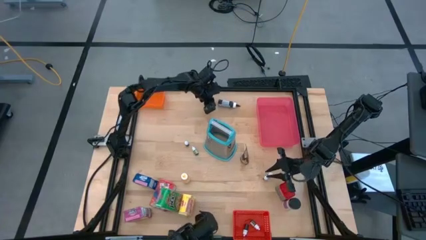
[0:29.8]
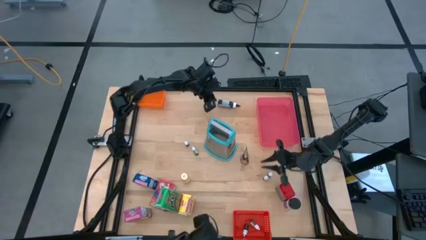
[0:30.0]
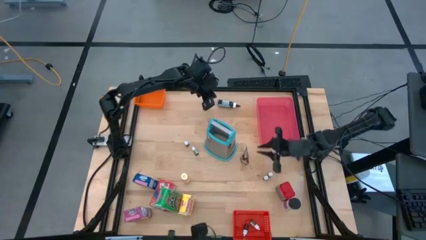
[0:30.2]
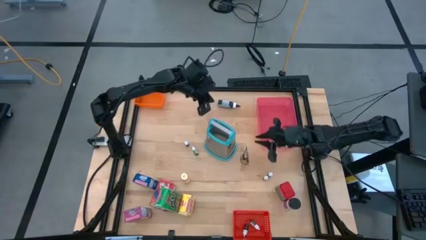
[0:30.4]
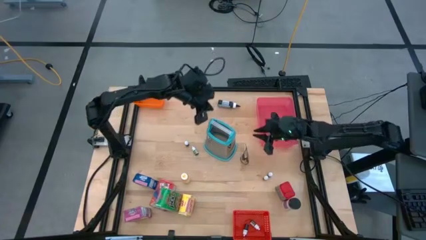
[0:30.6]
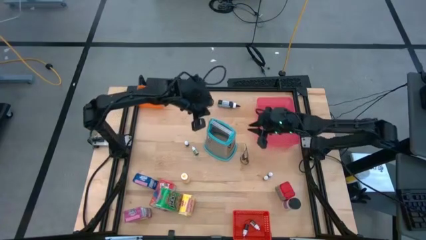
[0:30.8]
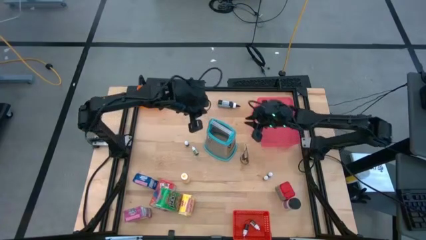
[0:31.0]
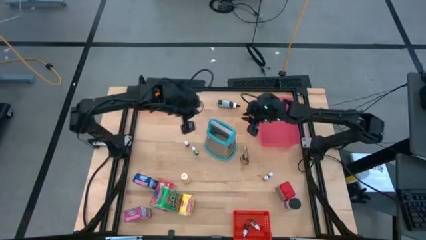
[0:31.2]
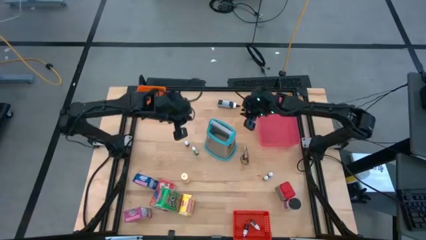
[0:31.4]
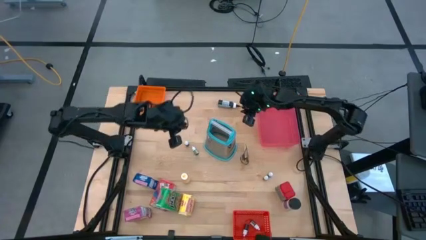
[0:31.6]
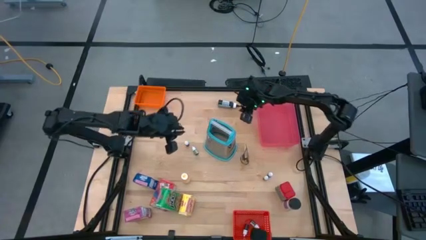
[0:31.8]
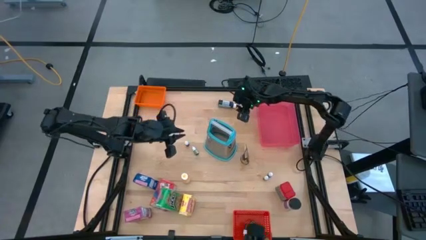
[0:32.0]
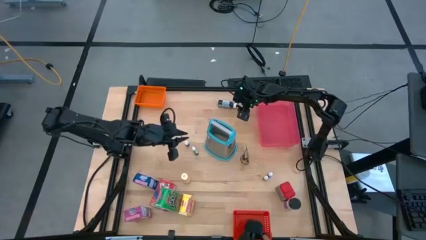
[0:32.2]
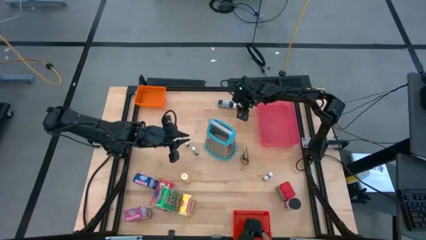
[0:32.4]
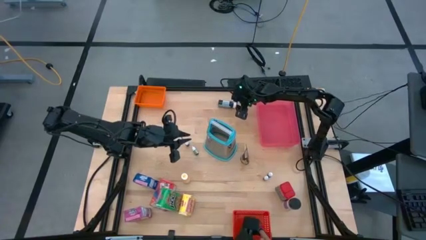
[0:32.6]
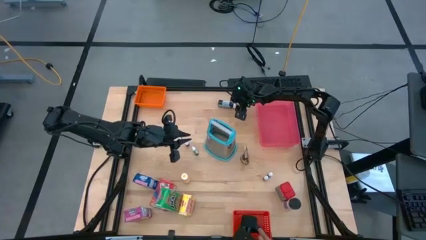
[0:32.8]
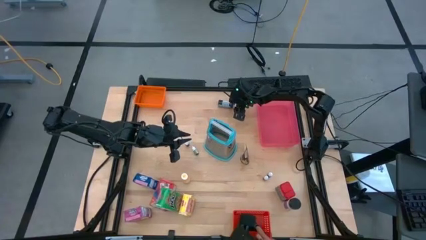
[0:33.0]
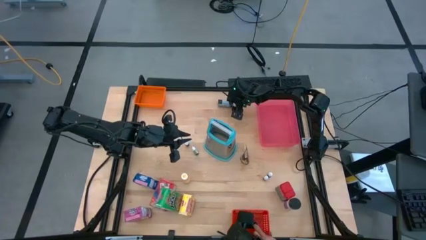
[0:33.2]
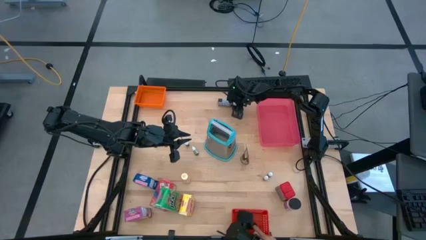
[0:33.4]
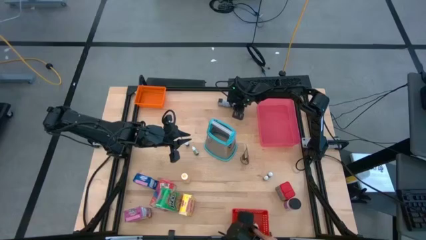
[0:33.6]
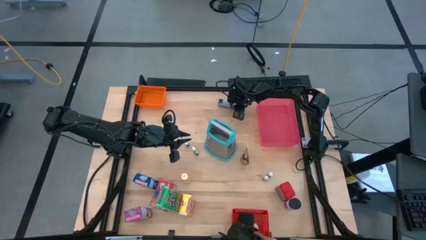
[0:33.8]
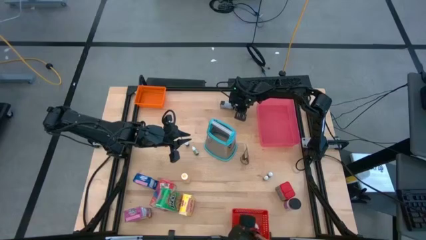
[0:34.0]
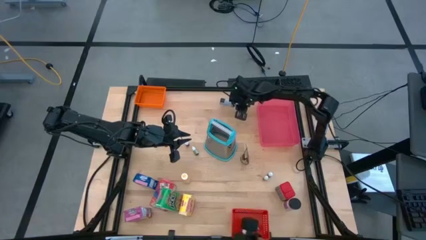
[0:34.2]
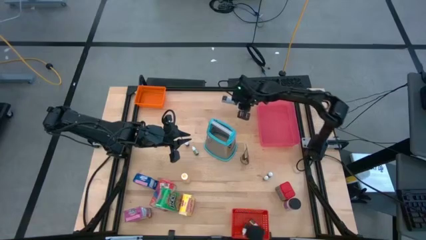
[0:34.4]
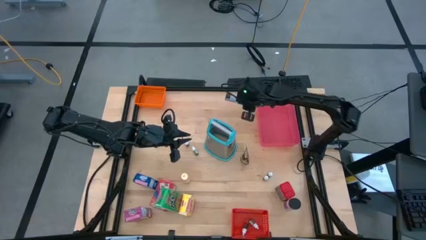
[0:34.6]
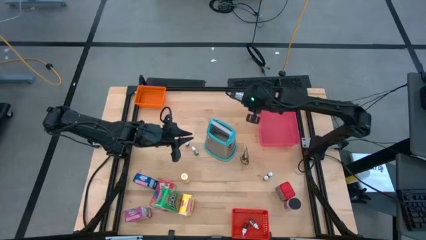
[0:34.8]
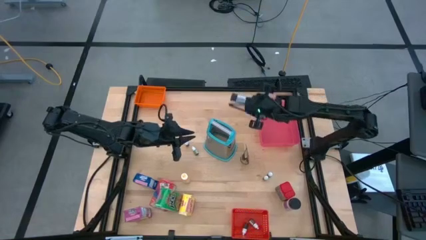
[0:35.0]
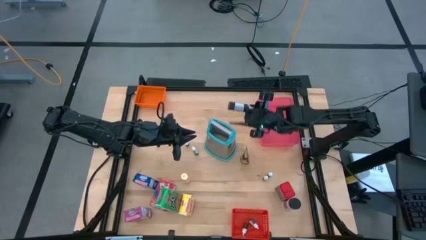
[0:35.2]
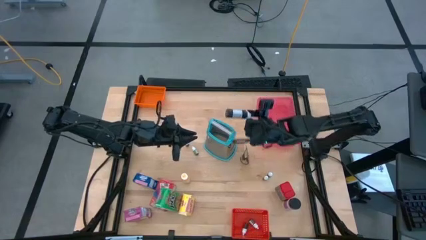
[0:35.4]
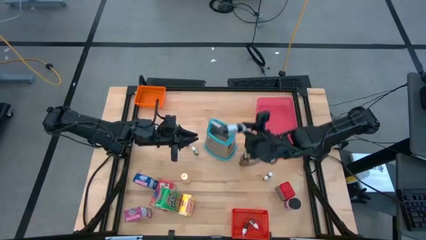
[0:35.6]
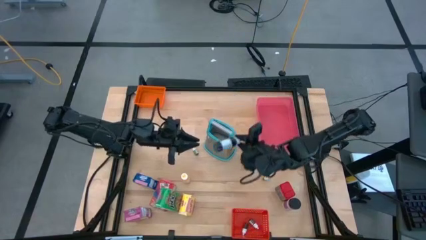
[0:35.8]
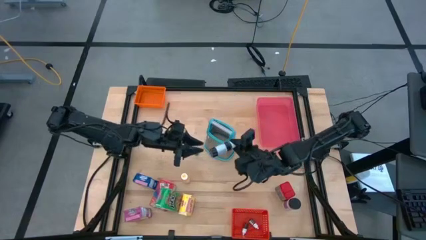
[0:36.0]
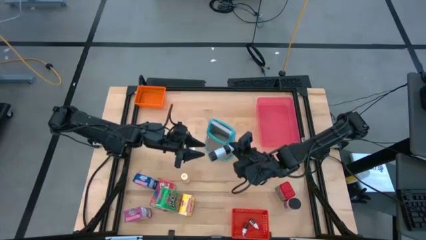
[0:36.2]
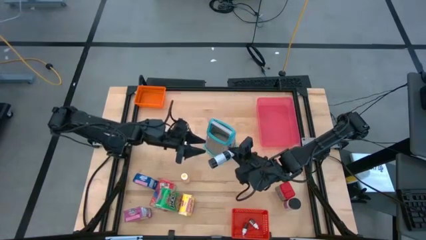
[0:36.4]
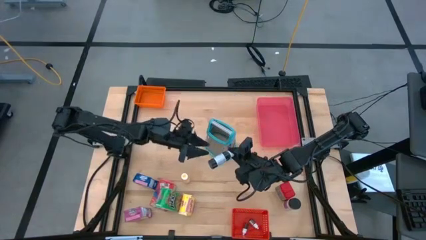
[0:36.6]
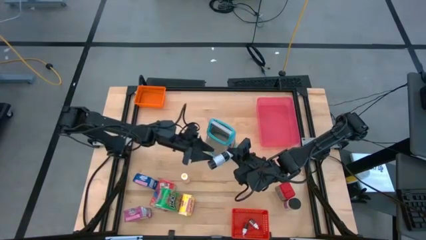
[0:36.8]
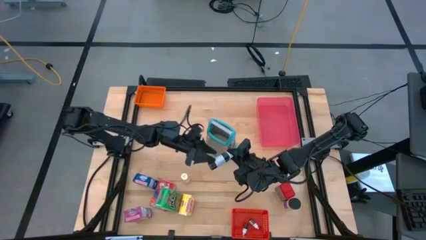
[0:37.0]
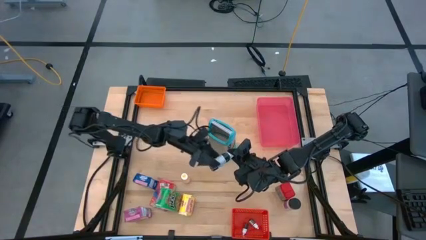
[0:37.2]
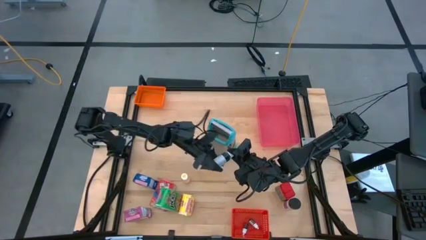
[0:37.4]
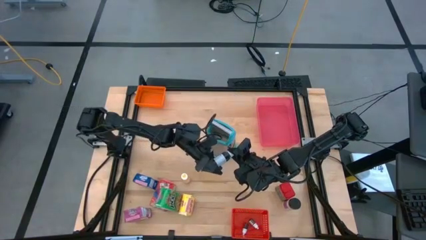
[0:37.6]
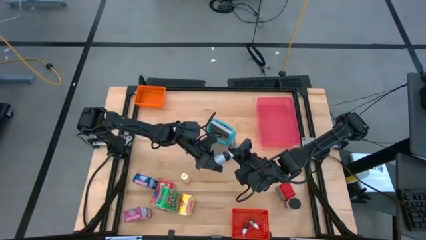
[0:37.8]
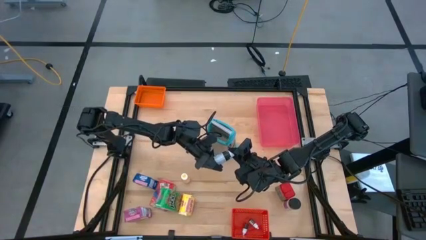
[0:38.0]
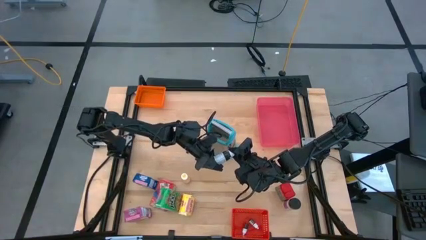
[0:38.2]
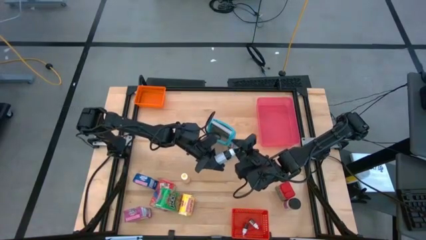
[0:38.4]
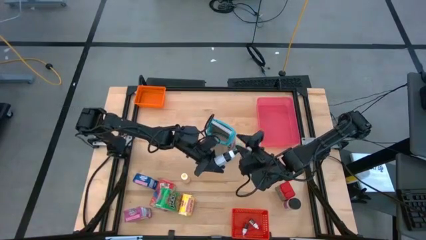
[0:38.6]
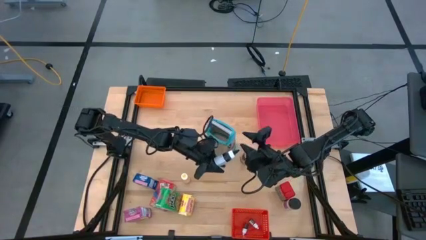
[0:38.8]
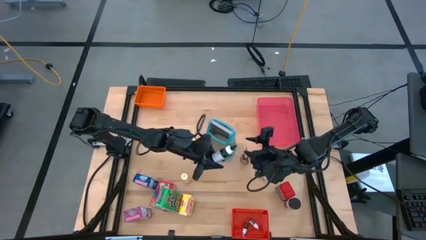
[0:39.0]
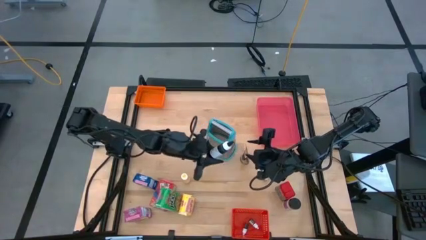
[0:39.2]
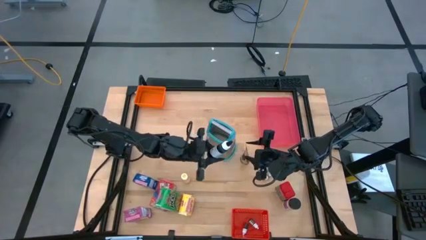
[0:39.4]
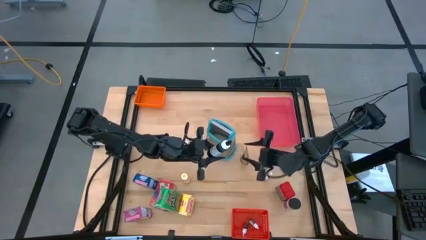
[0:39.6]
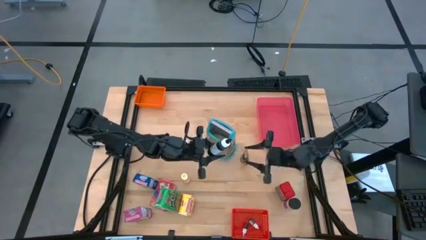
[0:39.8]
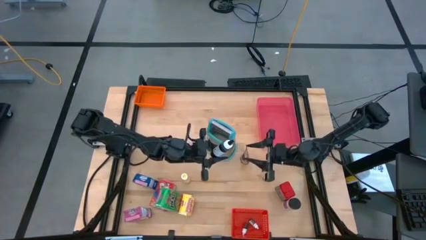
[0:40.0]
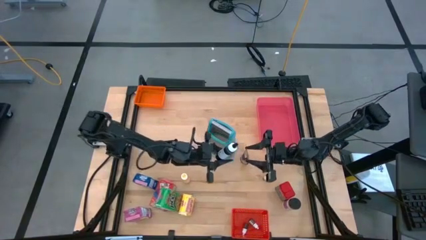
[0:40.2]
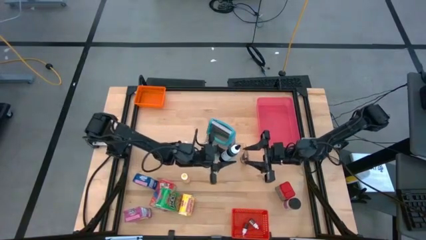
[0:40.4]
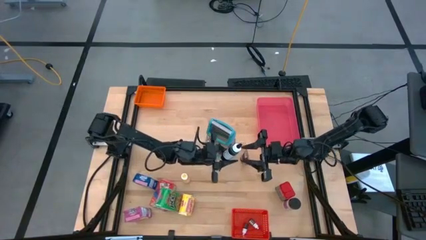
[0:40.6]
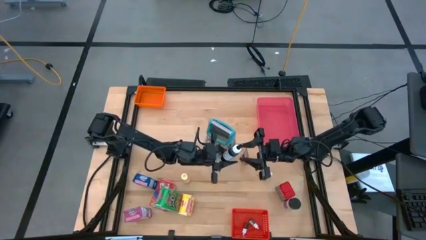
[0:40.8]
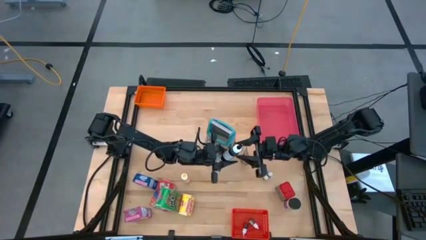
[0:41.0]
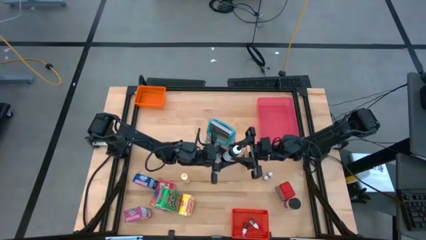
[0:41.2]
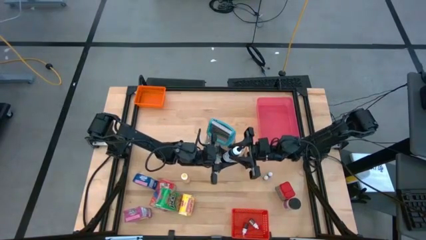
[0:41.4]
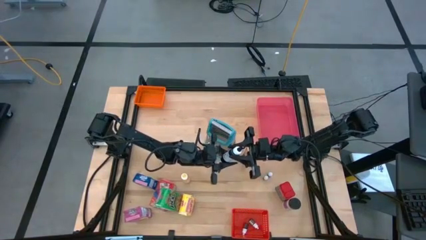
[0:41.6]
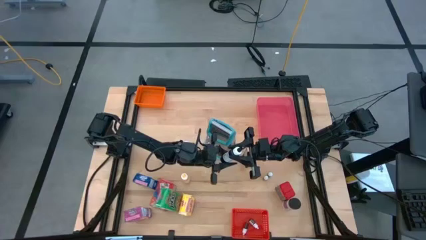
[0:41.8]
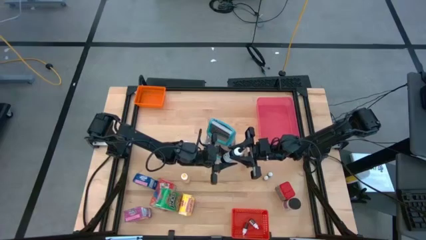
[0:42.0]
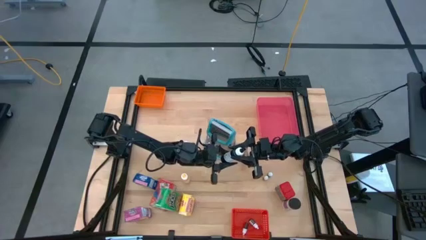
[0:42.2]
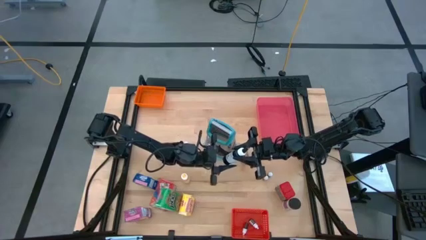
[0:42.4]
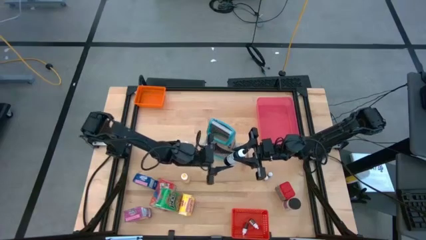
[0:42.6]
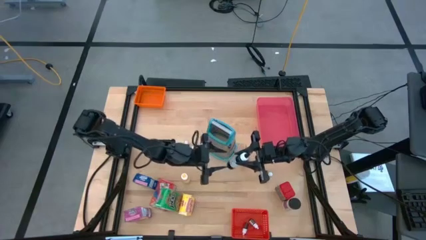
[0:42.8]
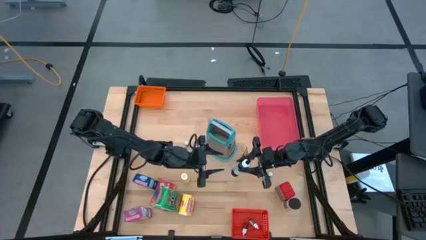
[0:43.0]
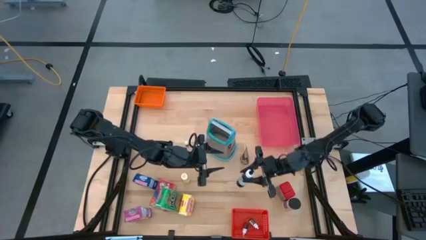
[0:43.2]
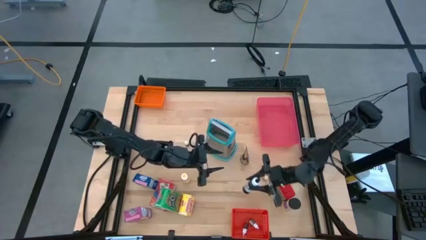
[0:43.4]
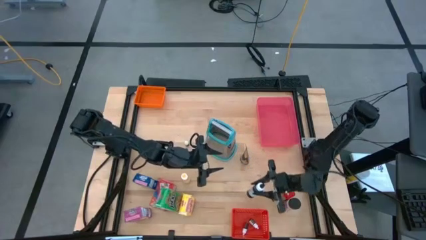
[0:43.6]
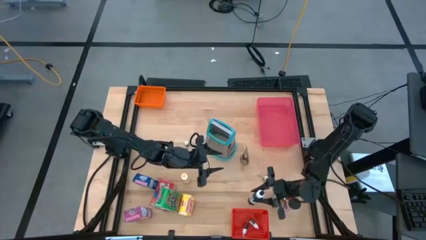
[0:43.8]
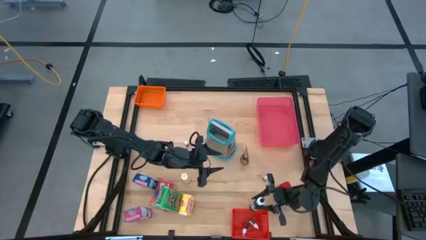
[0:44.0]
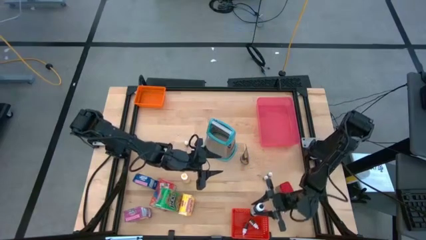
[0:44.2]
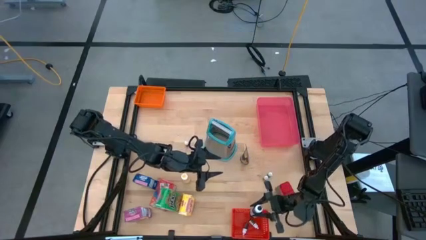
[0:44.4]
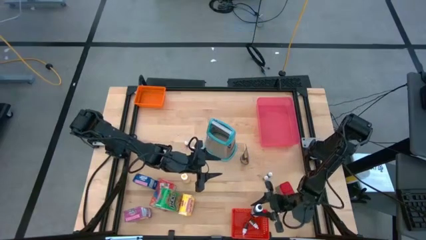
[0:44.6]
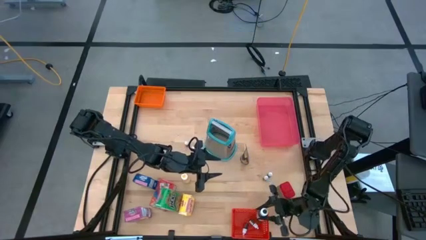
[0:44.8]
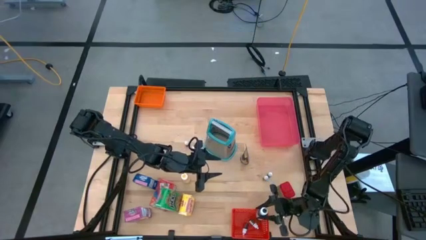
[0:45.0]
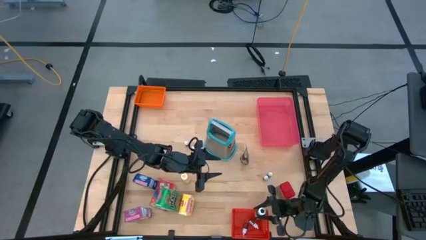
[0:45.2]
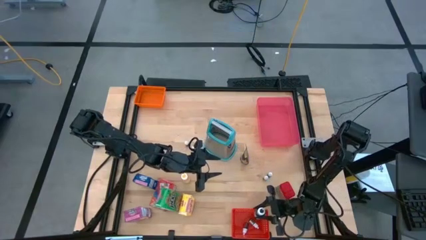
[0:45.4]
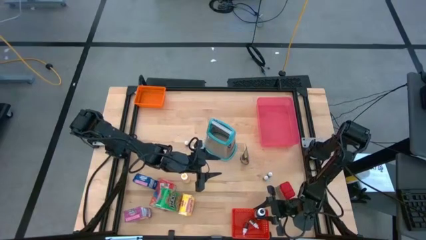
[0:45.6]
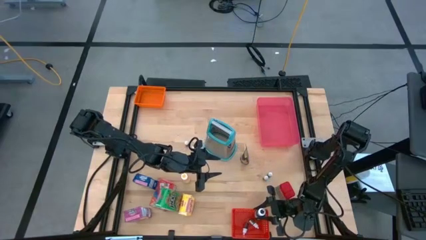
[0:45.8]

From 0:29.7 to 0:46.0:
Task: Pick & Place Kitchen Items
Put the big black food coloring bottle into the red bin
